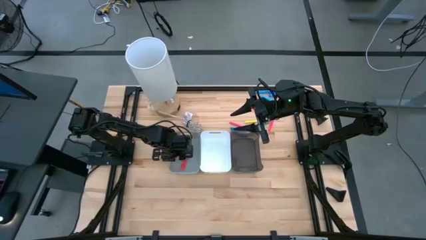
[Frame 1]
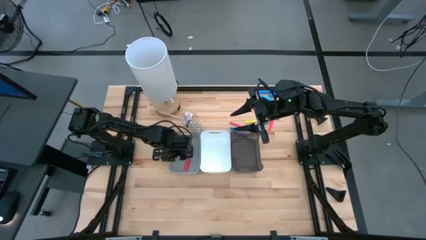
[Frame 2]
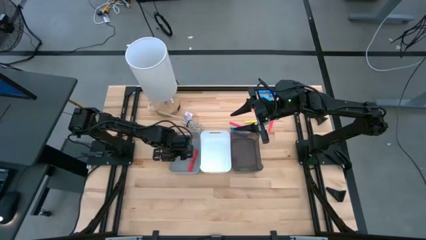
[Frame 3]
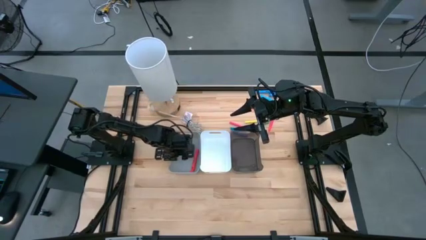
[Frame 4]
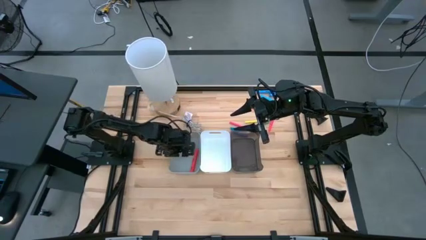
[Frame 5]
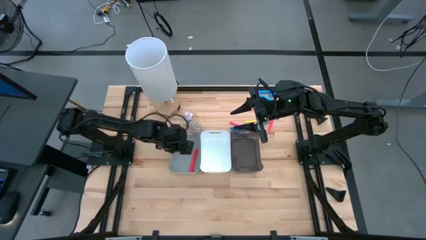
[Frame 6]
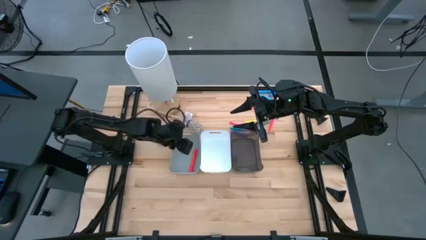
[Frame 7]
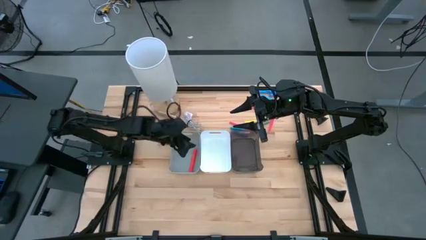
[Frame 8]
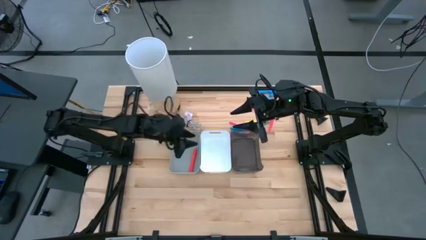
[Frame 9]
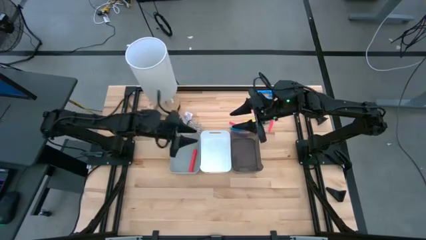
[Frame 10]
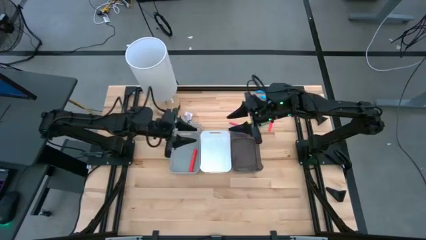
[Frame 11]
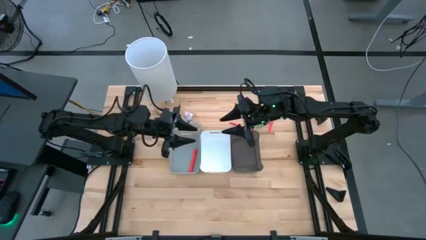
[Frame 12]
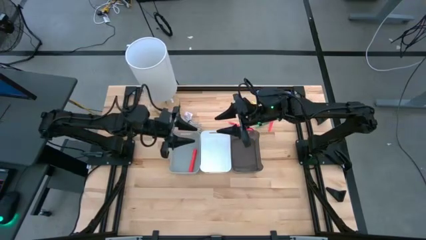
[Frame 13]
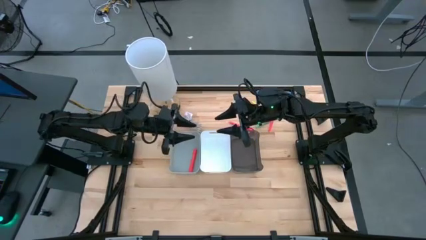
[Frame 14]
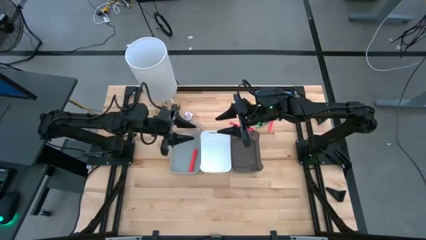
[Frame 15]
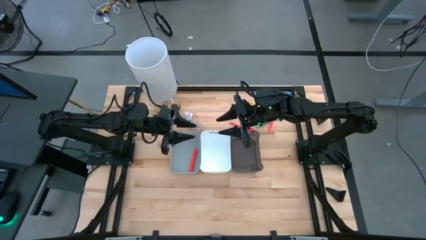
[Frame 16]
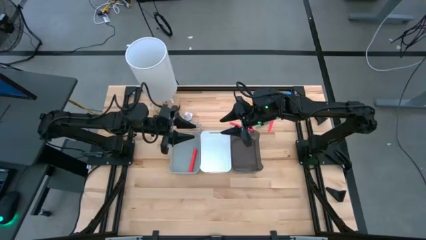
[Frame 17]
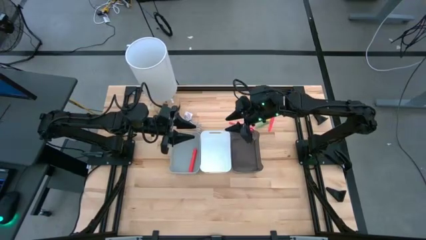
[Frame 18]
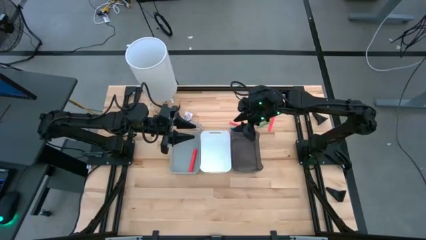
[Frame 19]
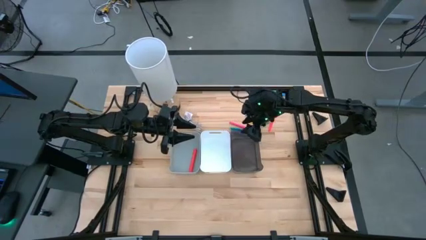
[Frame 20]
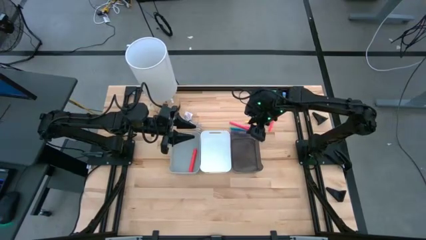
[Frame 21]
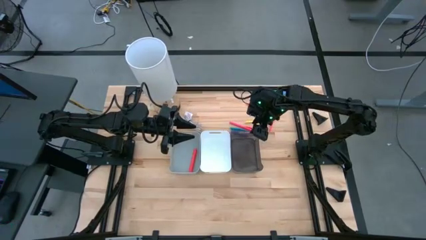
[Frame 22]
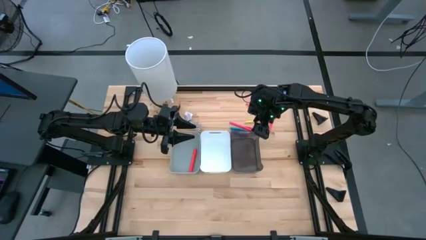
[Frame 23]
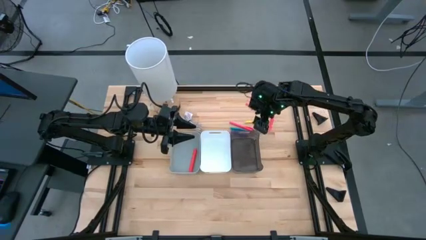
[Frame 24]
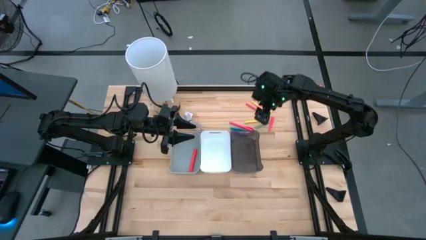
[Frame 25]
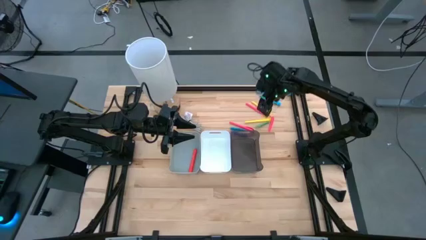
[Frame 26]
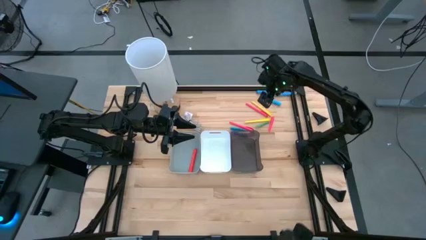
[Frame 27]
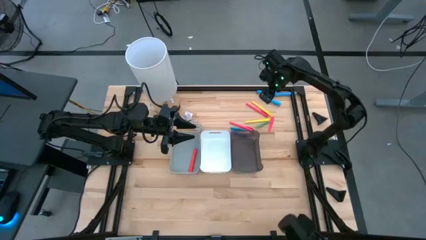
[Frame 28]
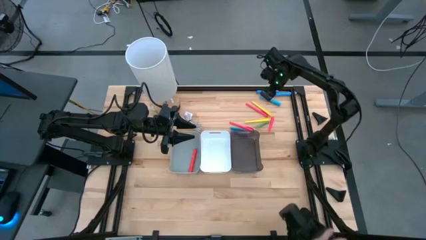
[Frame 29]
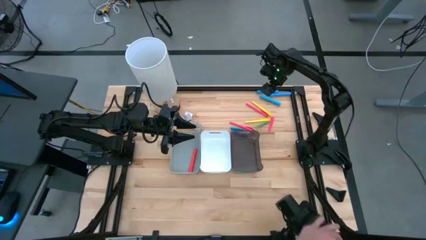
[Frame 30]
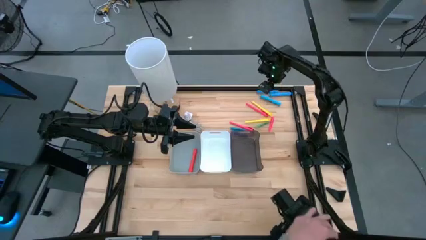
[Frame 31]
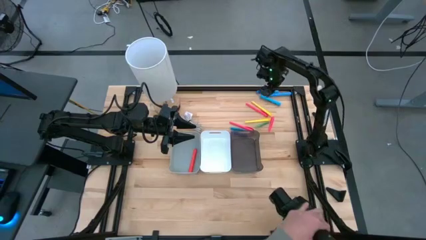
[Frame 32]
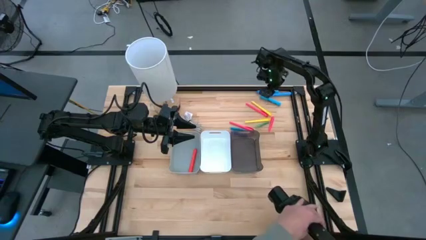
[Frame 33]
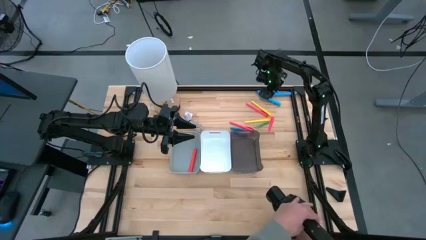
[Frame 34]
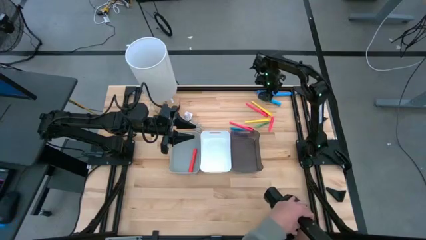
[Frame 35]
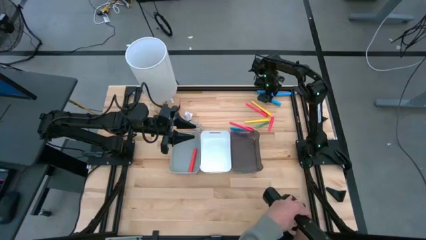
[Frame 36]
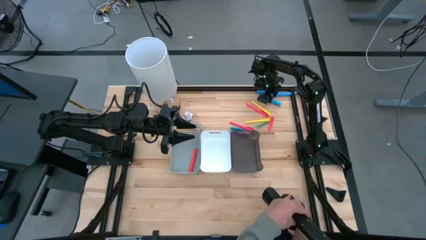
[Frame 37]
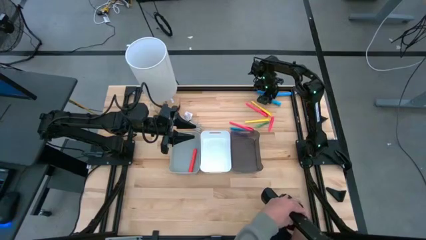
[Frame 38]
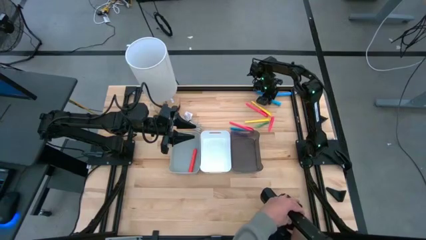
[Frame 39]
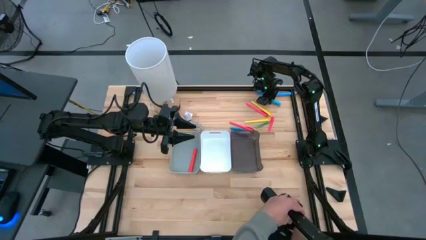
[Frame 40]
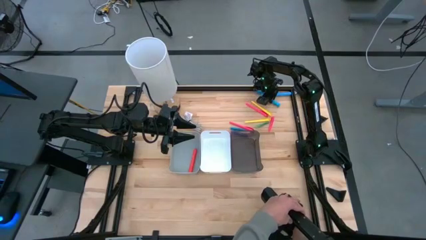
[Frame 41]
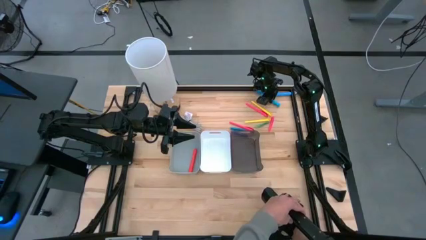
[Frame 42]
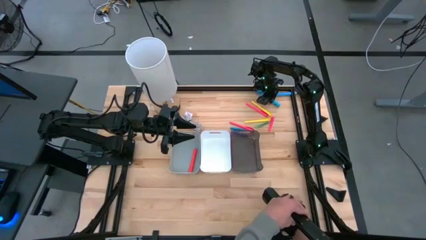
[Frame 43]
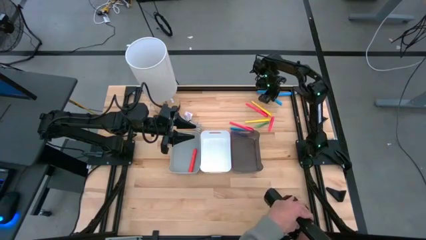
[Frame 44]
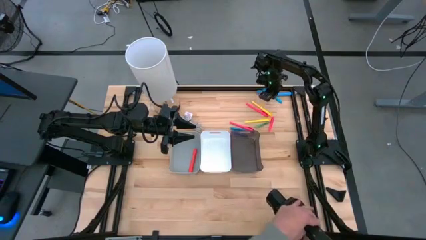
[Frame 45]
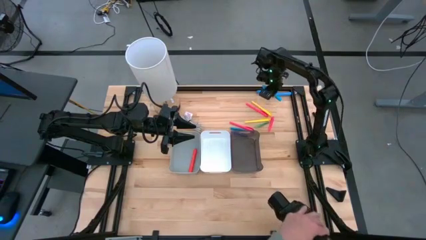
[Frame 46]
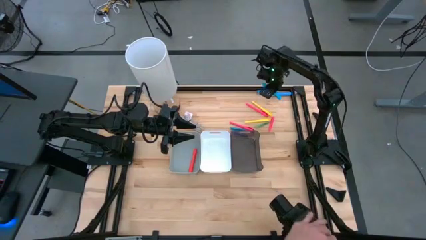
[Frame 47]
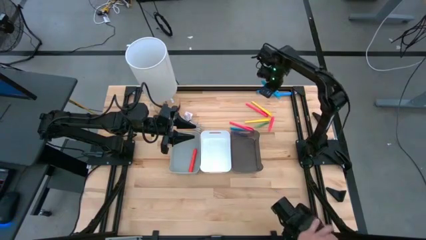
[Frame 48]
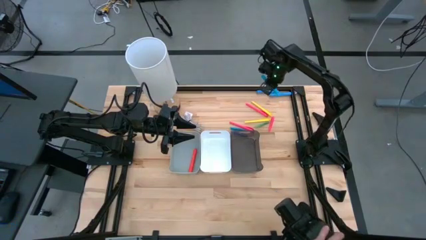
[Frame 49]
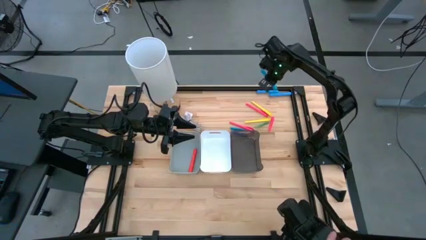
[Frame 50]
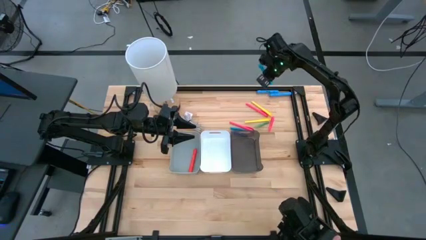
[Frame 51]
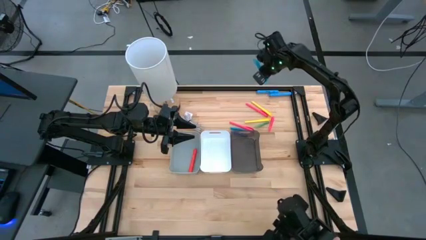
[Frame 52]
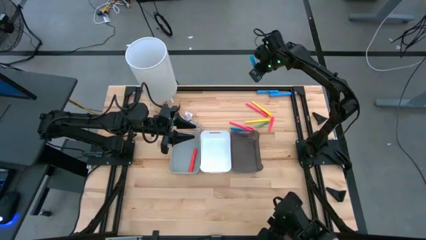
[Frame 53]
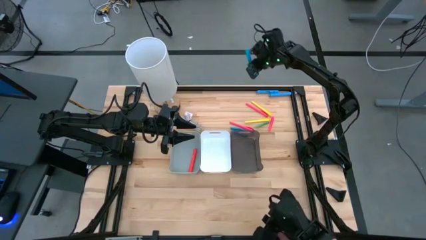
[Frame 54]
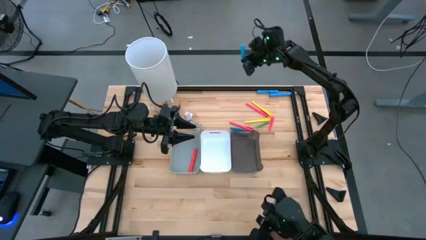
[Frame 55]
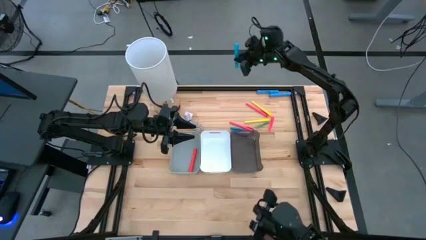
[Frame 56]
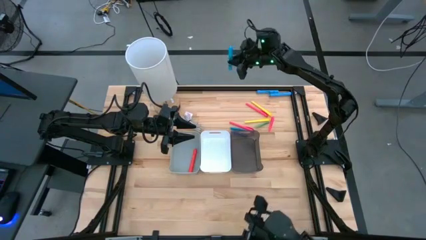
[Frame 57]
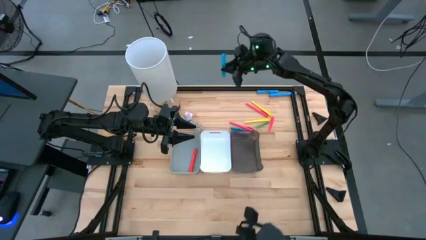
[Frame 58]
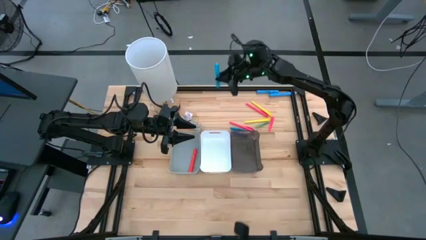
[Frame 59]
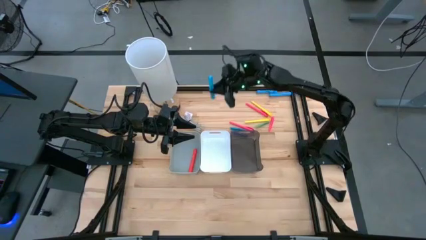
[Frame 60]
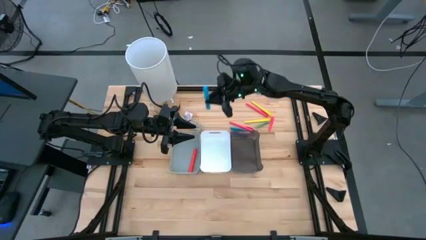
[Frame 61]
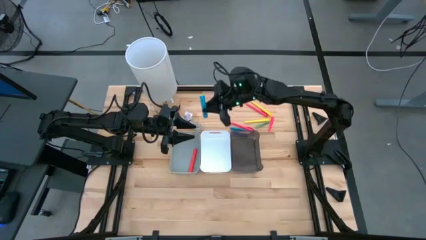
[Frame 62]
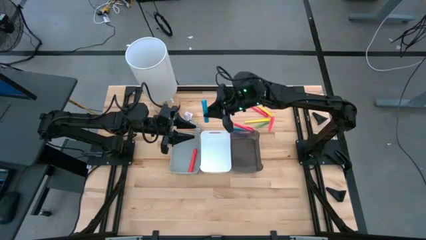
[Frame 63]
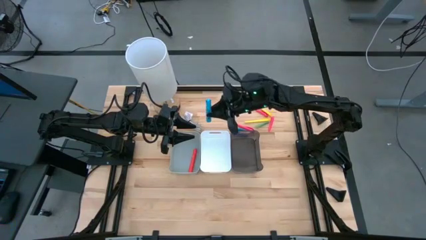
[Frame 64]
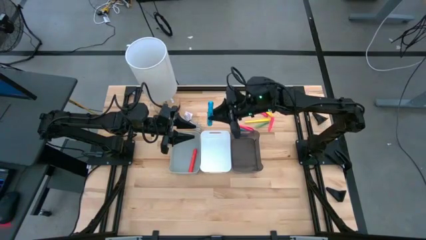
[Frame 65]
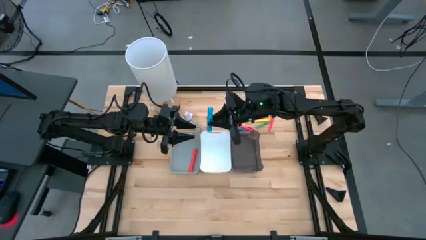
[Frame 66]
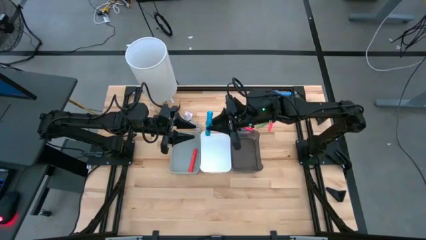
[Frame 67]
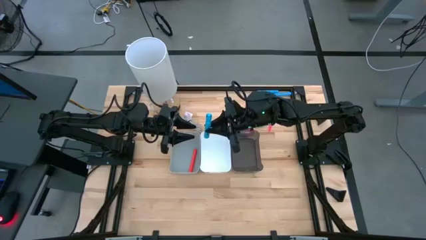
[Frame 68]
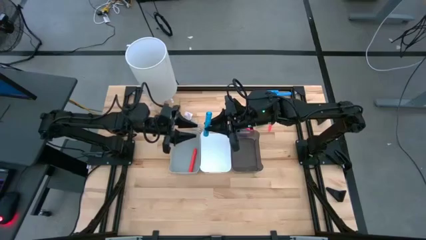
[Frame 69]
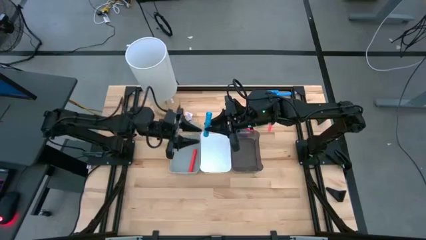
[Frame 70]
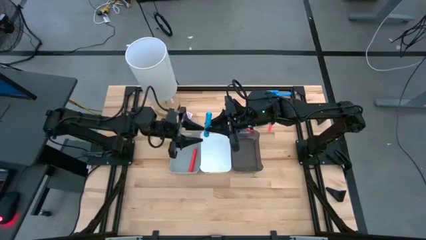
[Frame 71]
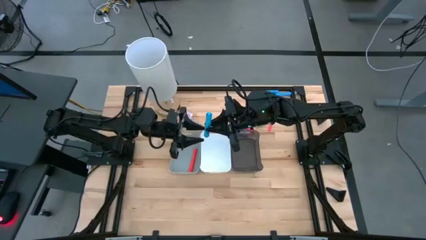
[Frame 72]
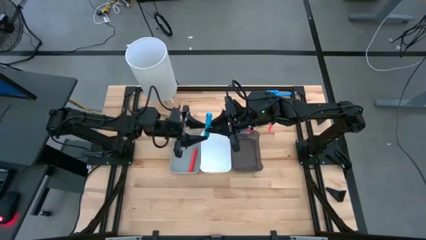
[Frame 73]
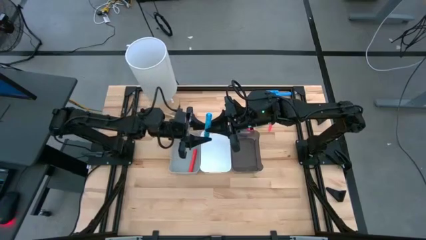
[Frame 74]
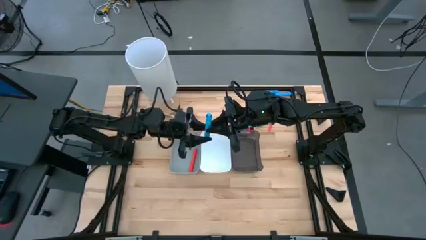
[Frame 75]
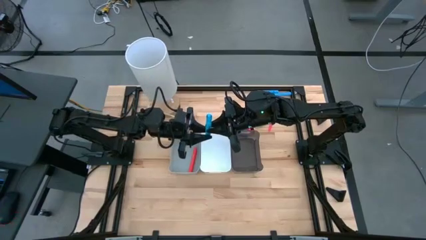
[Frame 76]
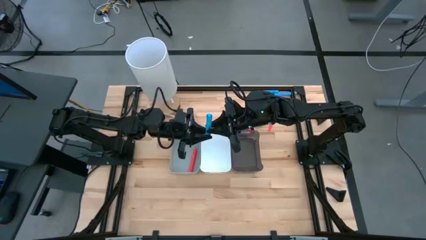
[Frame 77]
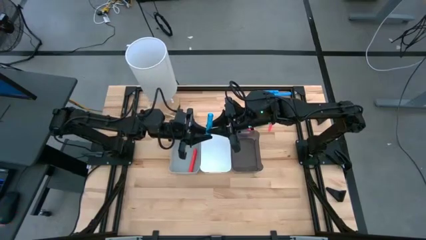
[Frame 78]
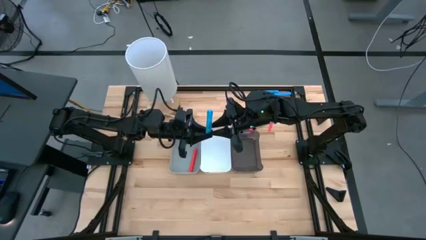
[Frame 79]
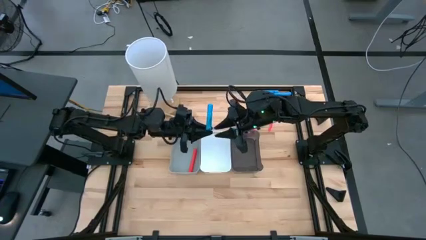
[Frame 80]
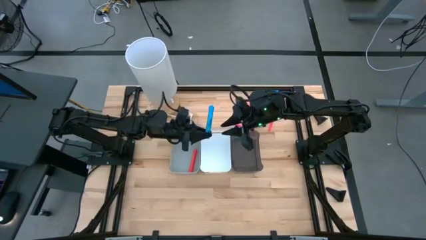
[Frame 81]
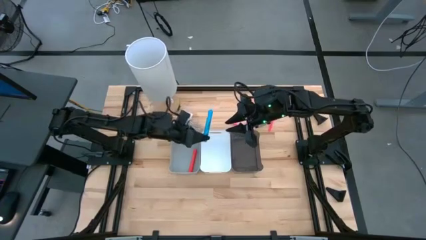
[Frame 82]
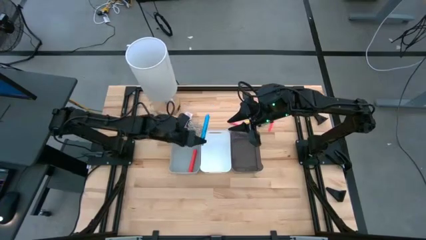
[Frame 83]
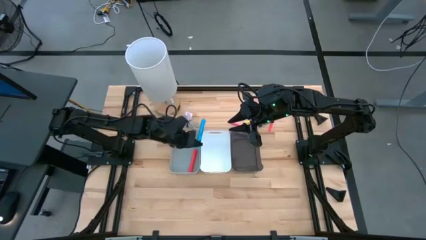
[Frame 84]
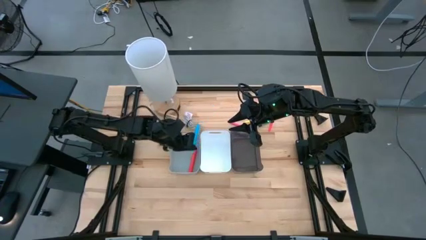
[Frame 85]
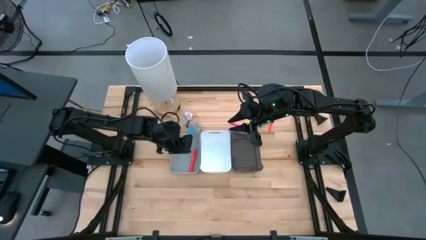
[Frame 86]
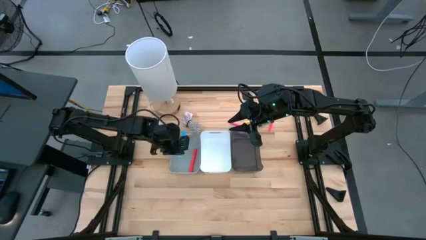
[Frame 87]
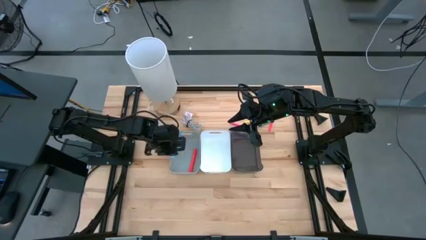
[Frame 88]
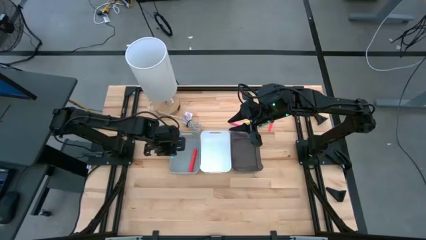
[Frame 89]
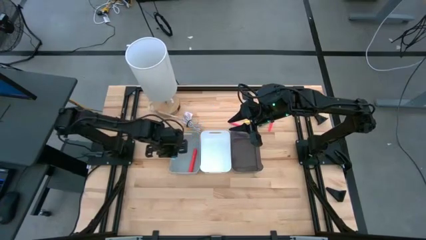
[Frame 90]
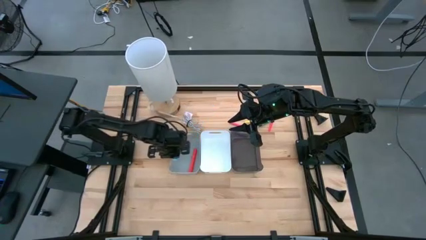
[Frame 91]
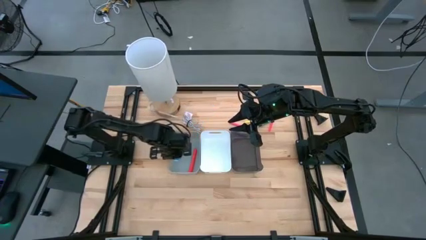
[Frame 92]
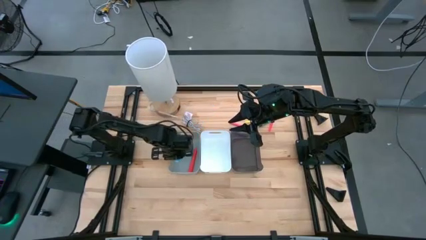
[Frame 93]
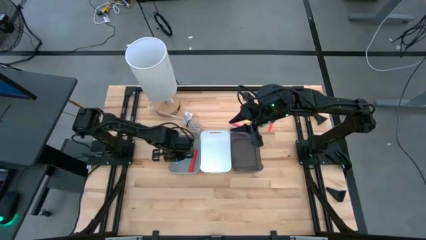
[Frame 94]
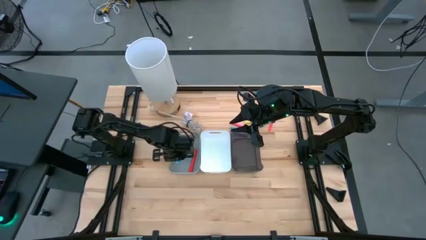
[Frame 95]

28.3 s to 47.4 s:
Task: Pick & Place Markers
Put the top blue marker into the gray bin
